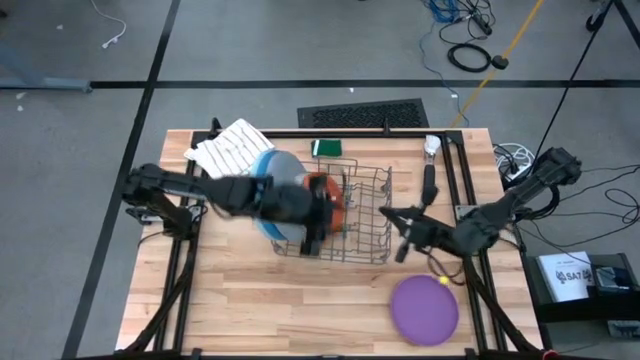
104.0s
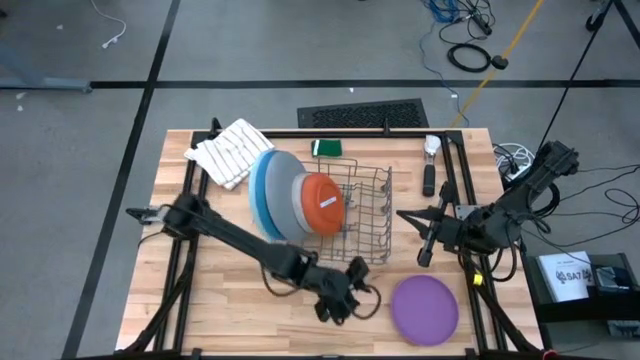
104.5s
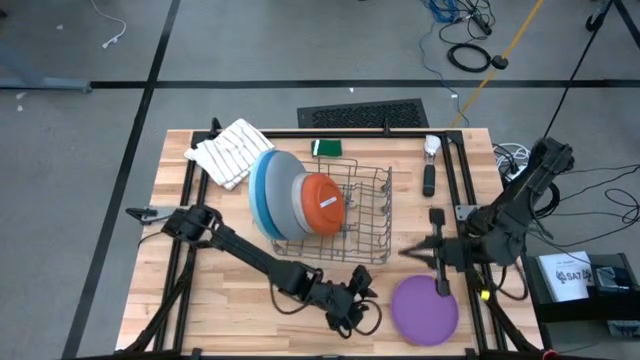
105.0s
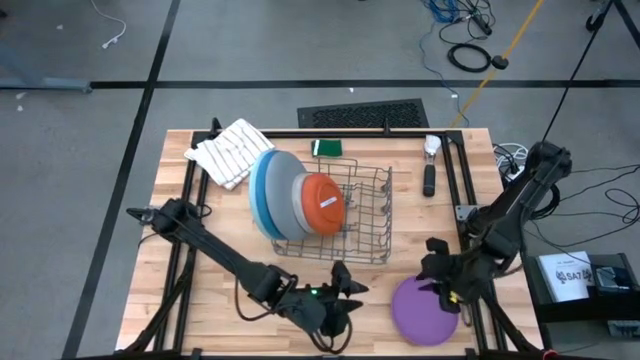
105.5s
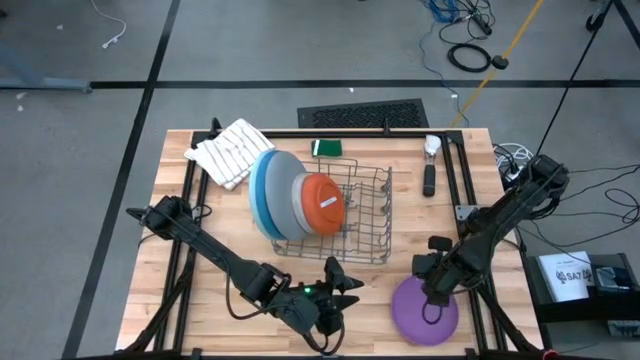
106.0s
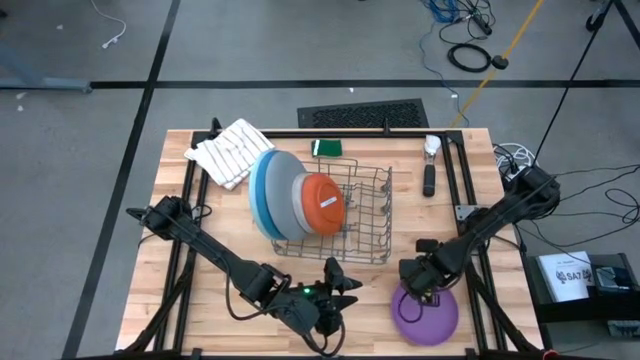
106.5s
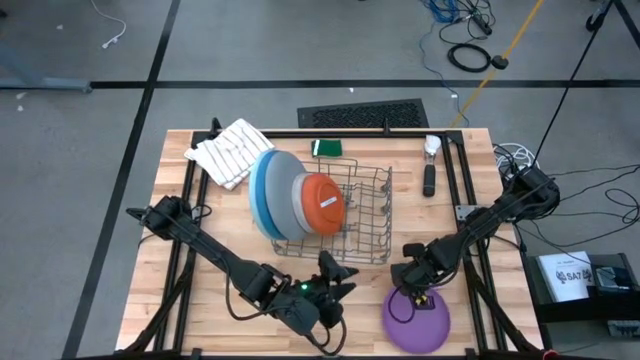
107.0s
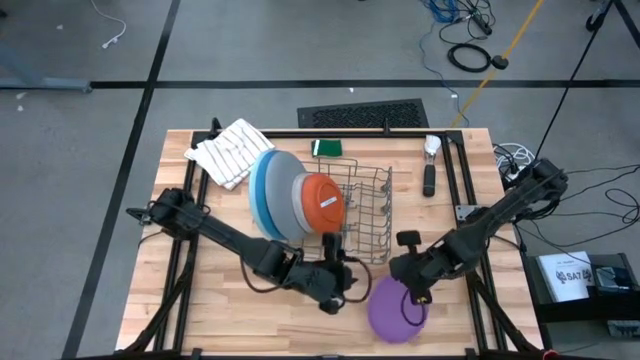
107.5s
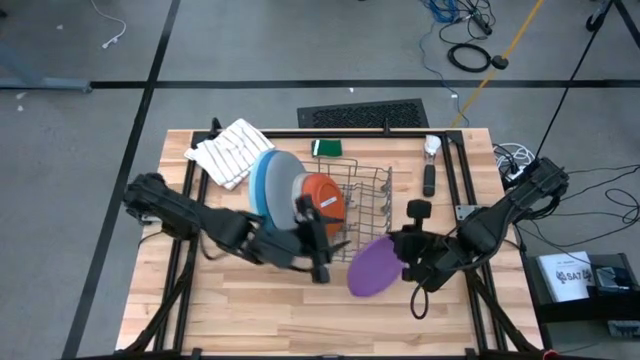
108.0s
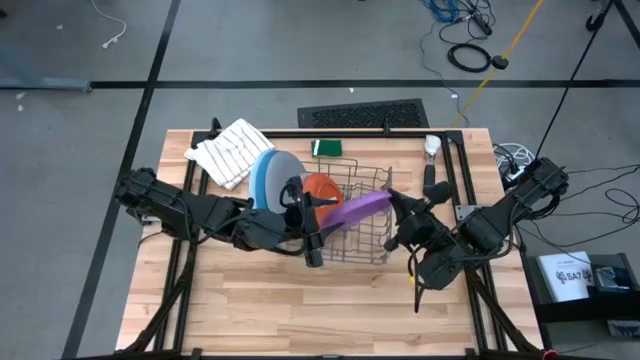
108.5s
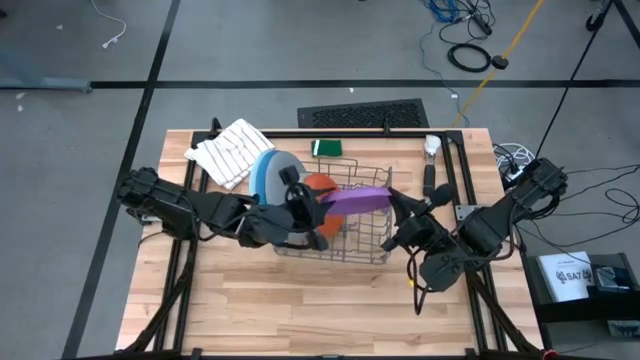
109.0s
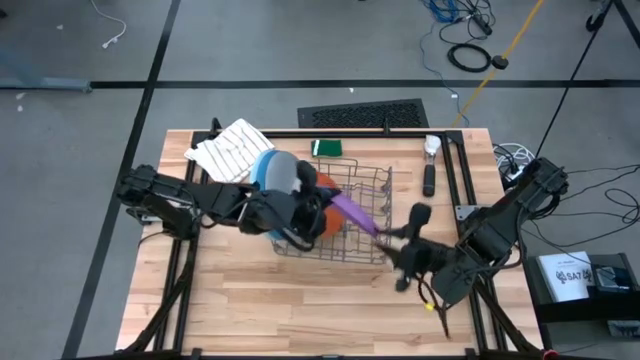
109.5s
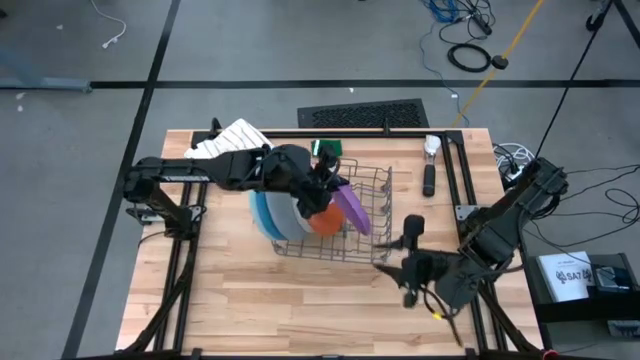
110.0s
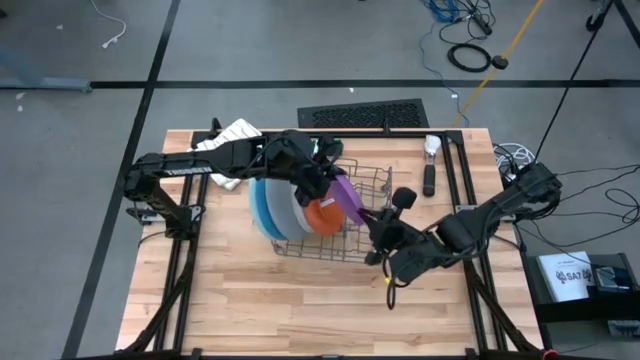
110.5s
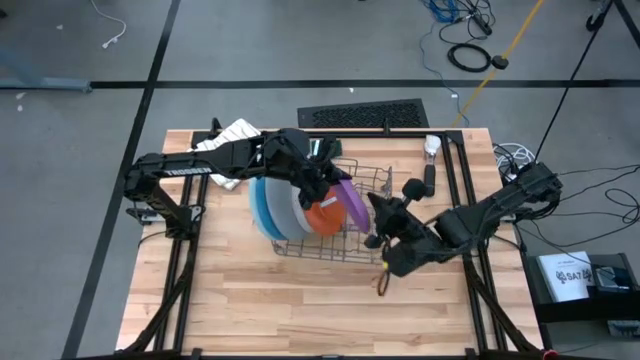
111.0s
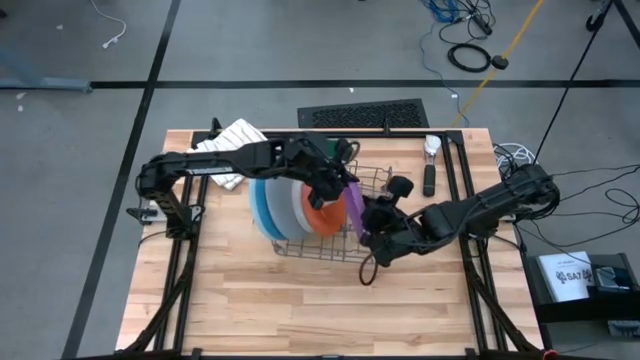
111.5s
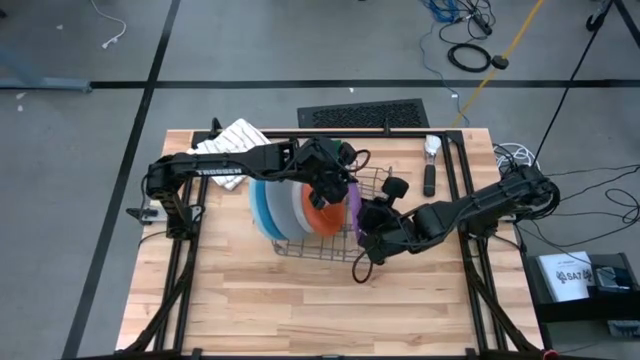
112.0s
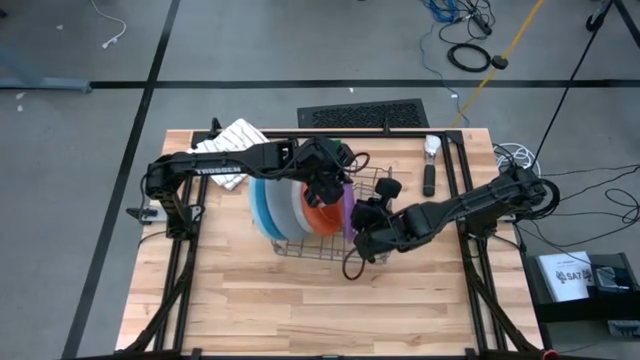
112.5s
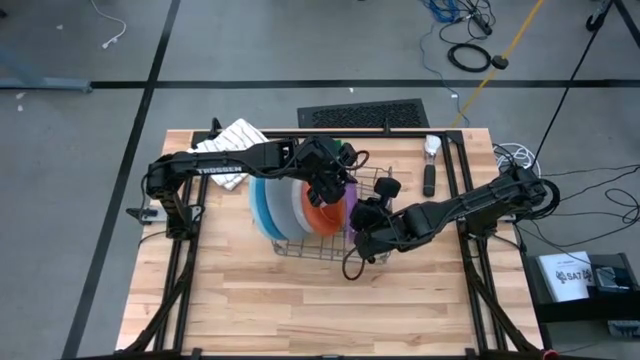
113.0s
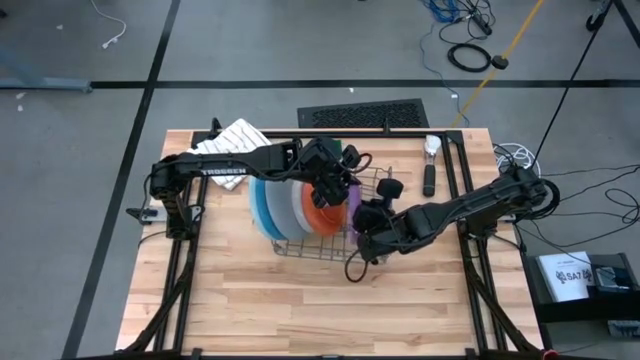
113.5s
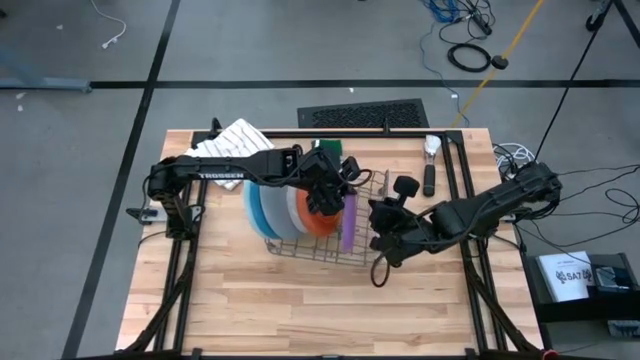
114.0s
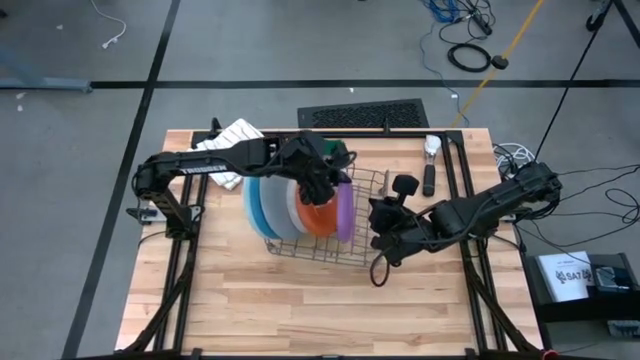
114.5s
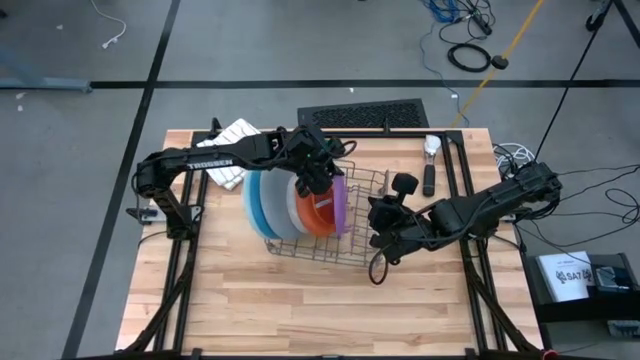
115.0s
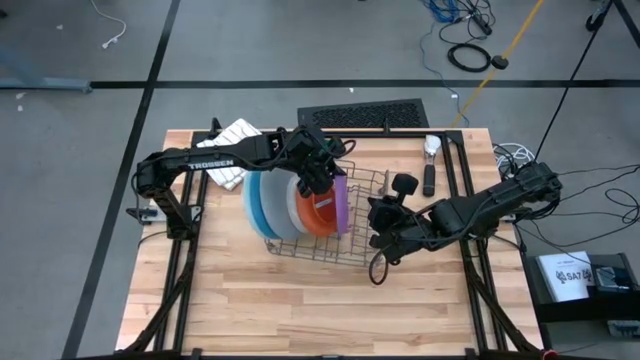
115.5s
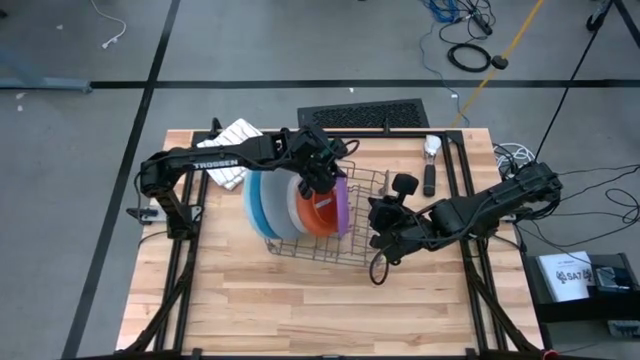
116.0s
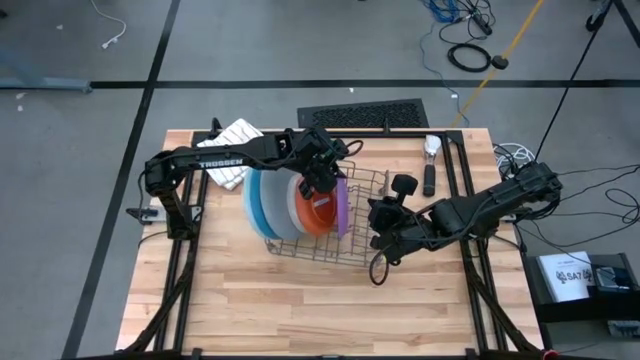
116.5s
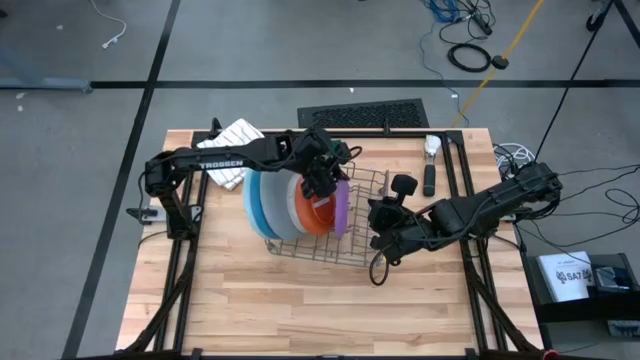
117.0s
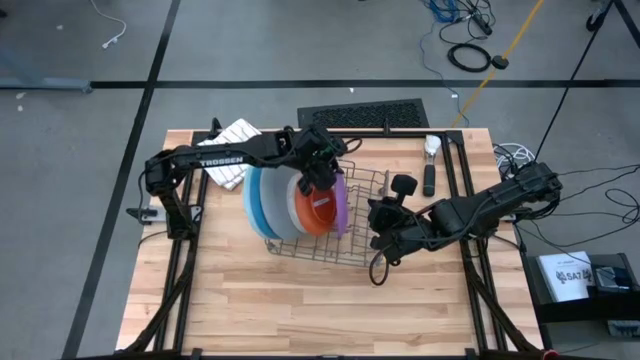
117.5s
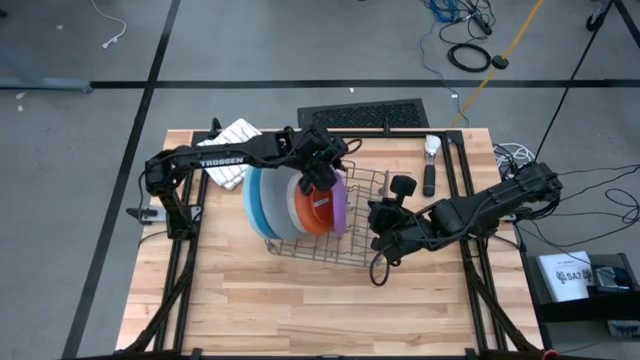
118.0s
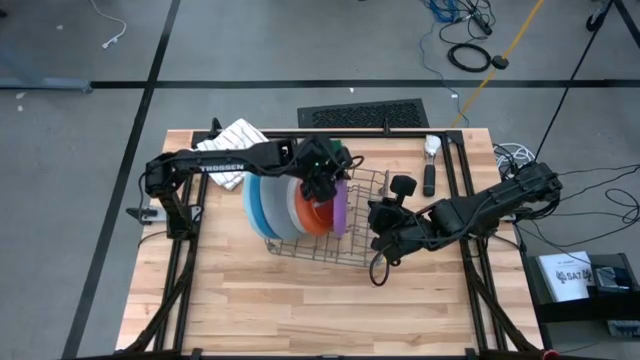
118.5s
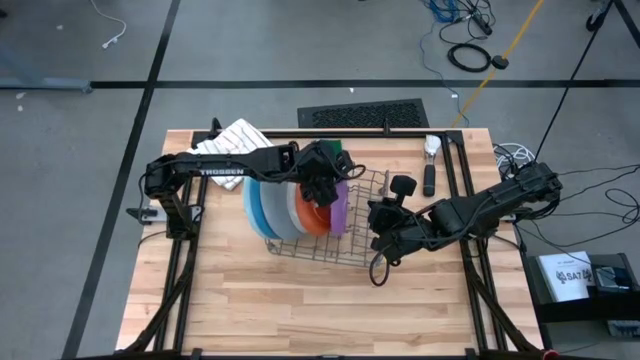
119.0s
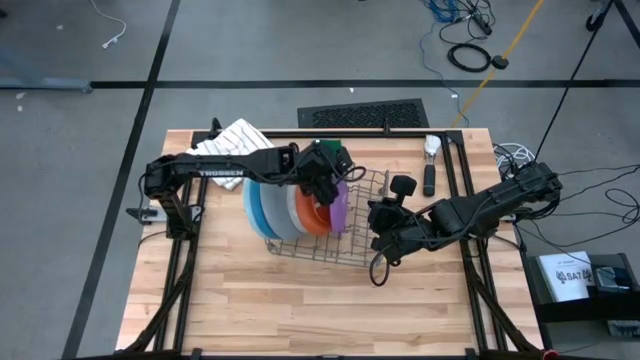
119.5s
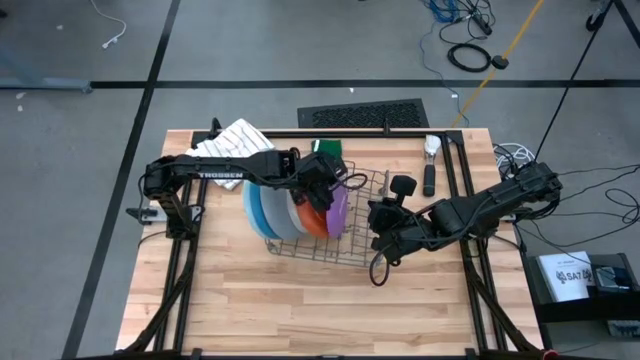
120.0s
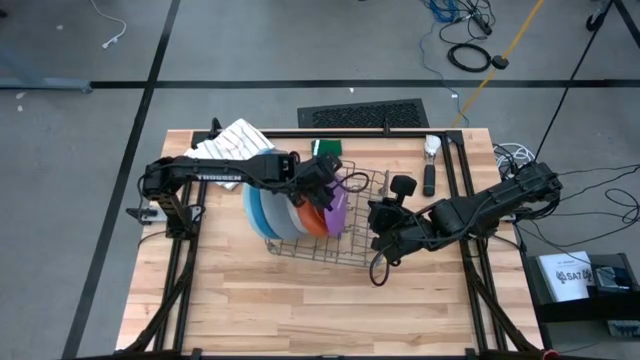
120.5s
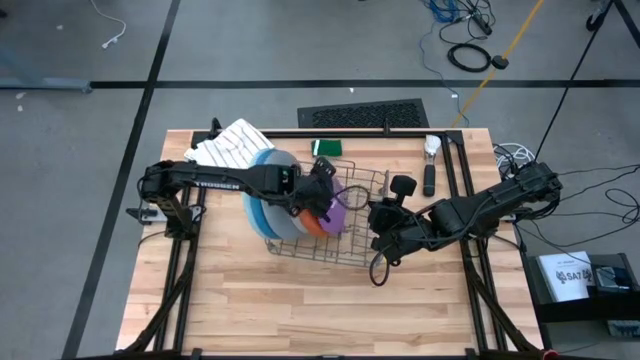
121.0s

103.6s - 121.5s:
Task: Sort dishes
Put the purple plate into the dish rack

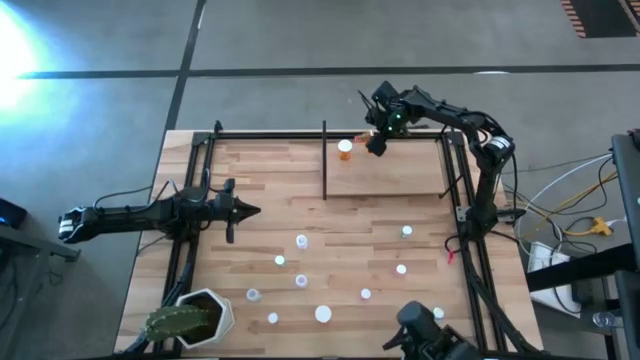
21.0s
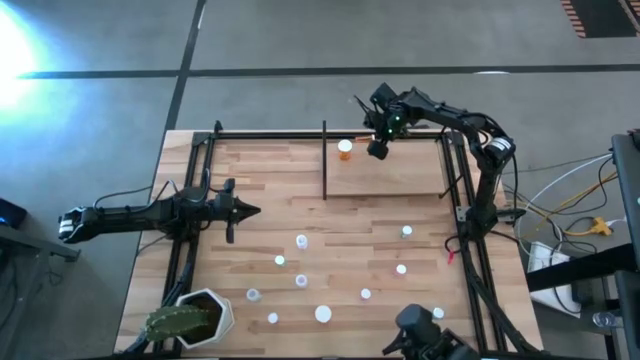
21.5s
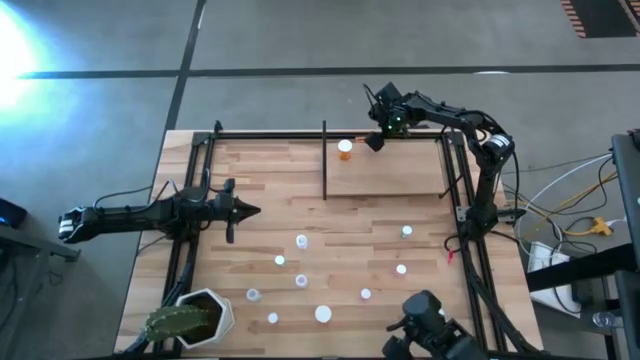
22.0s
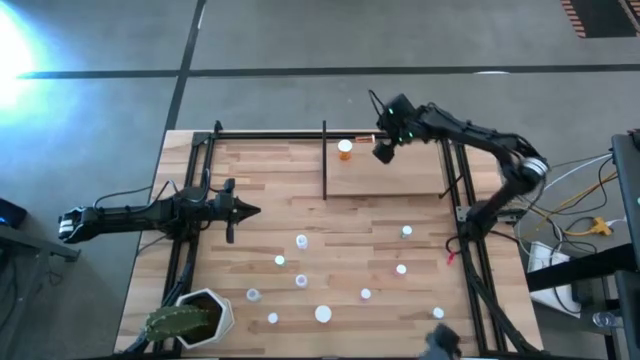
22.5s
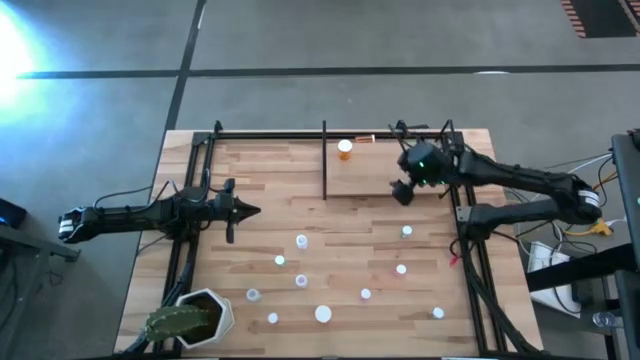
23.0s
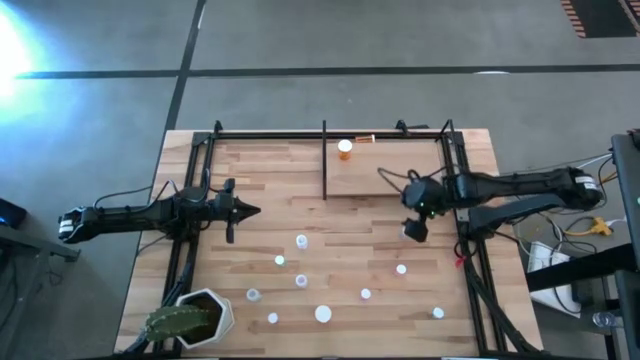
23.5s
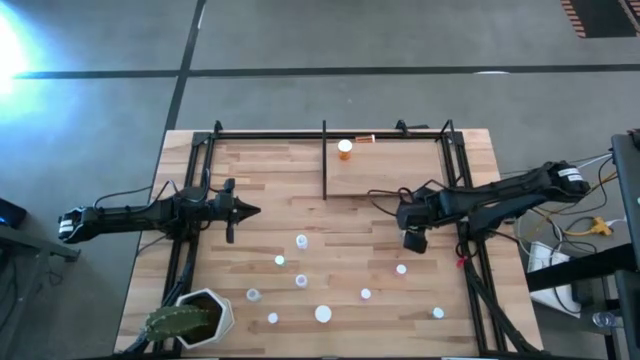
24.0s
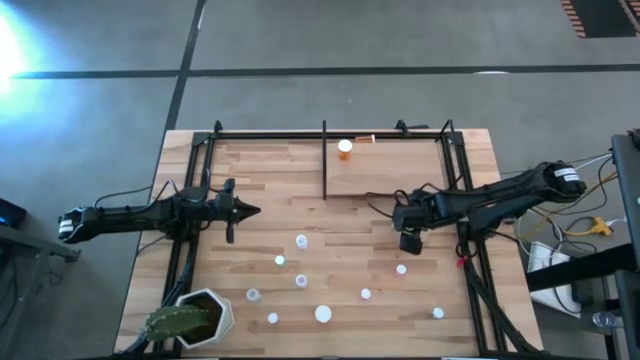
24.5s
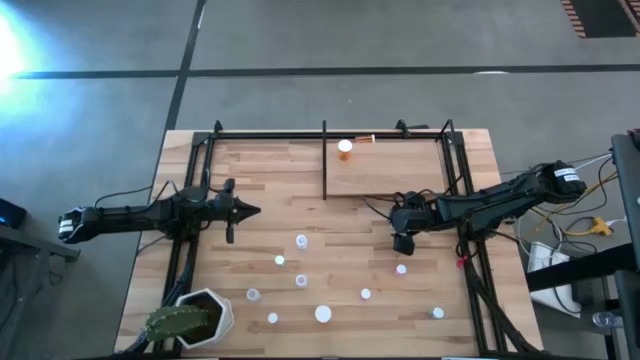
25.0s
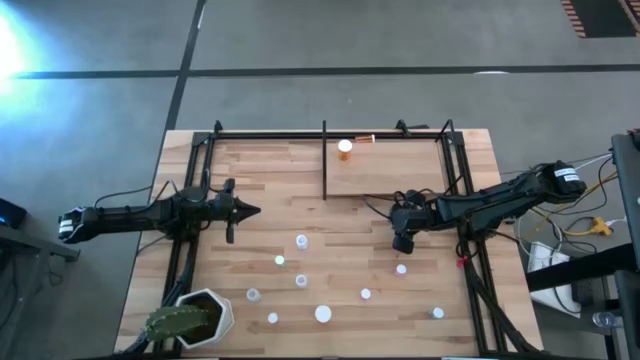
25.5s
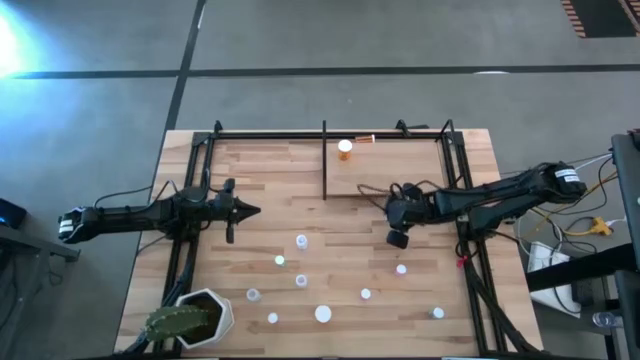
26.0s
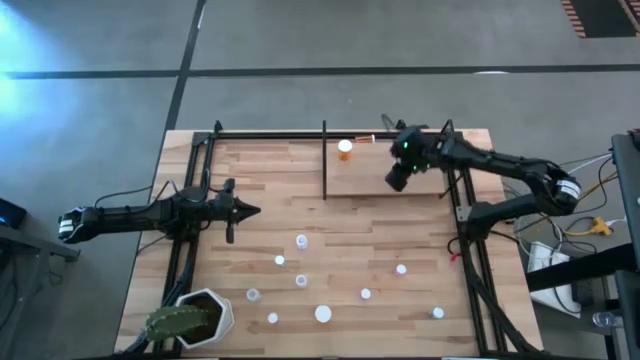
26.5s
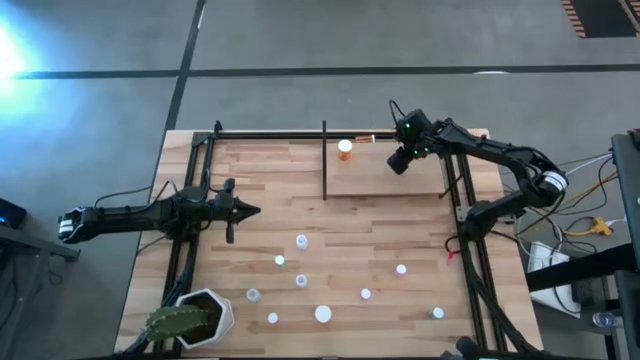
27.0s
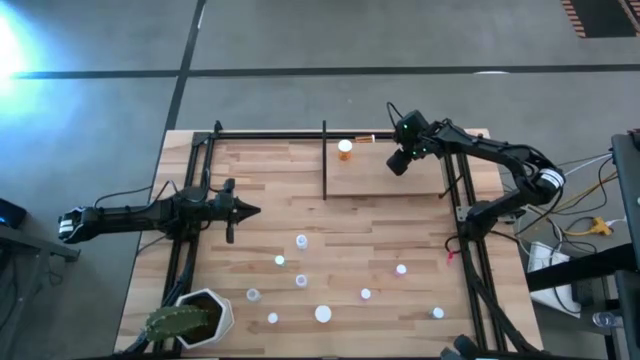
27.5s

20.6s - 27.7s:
Task: Pick and place medicine bottles onto shelf by color
Put the top blue pill bottle on the shelf
